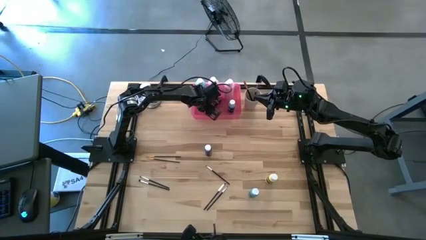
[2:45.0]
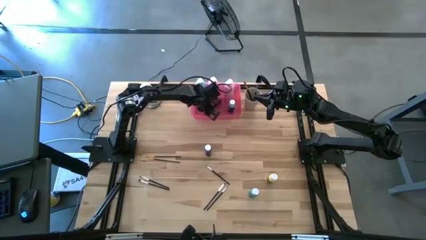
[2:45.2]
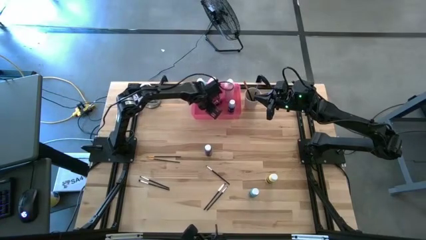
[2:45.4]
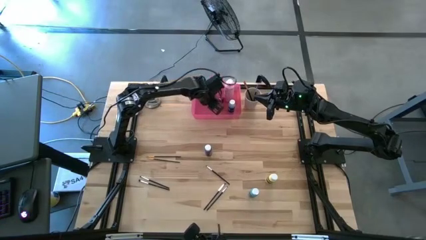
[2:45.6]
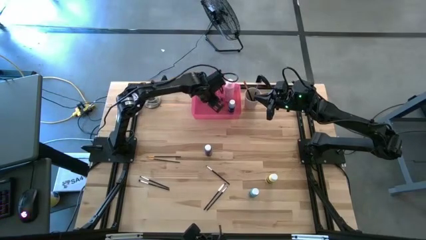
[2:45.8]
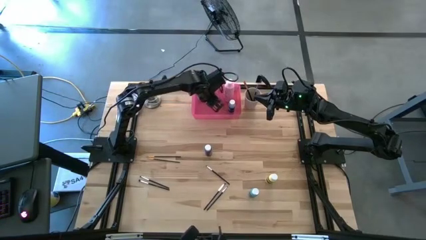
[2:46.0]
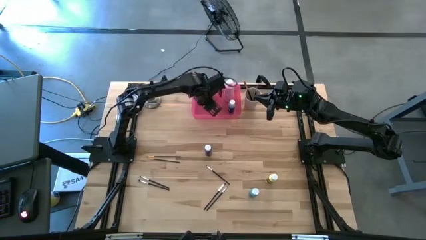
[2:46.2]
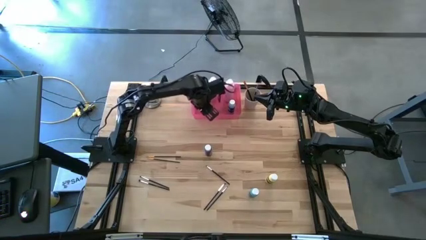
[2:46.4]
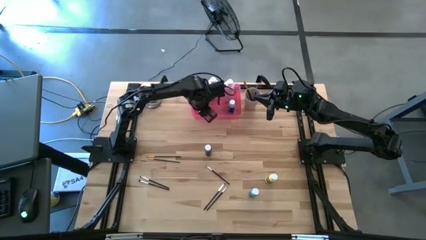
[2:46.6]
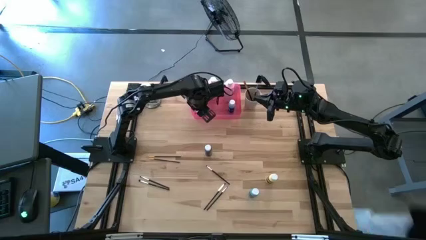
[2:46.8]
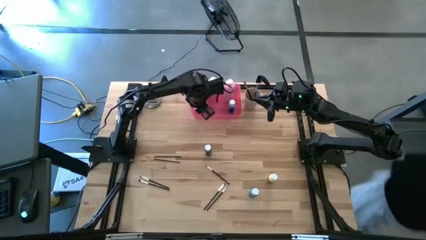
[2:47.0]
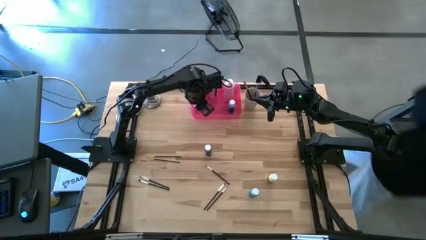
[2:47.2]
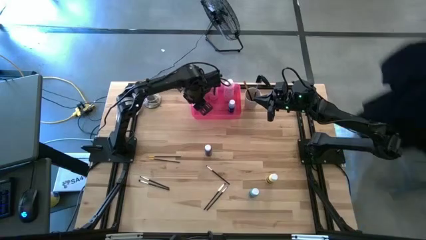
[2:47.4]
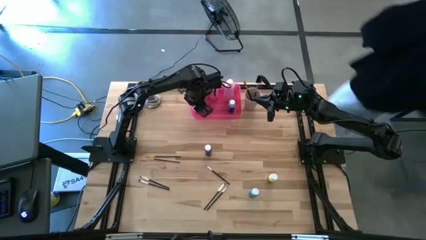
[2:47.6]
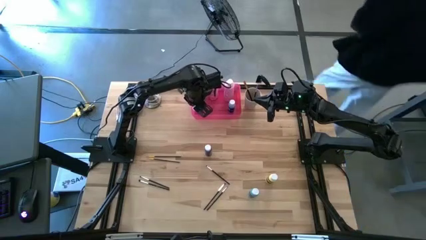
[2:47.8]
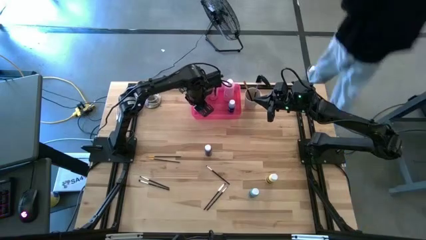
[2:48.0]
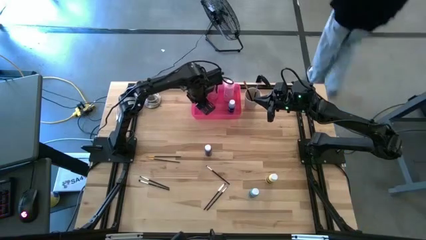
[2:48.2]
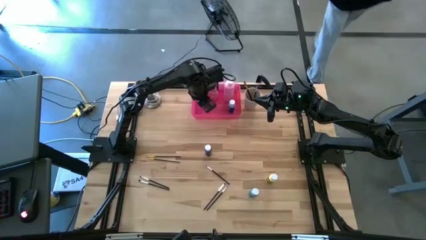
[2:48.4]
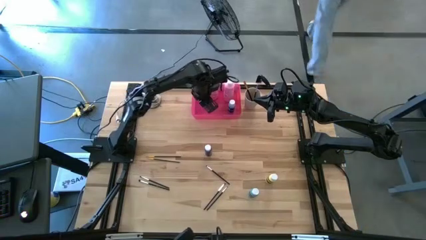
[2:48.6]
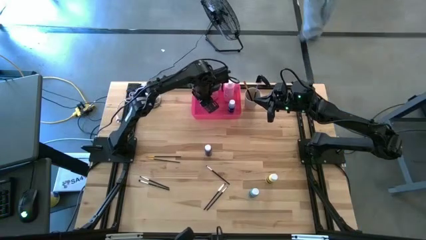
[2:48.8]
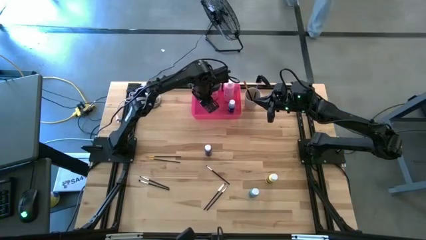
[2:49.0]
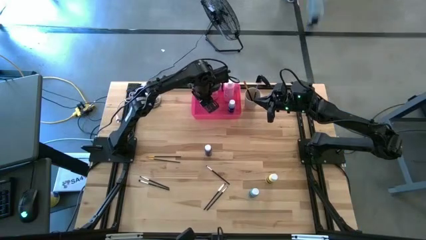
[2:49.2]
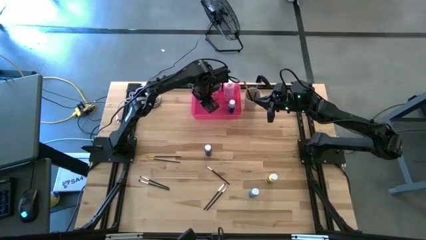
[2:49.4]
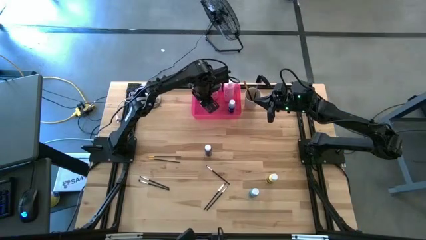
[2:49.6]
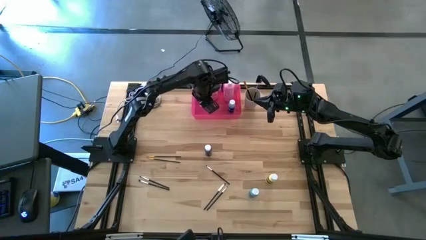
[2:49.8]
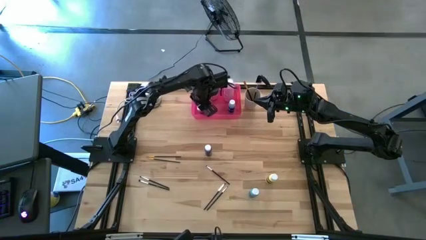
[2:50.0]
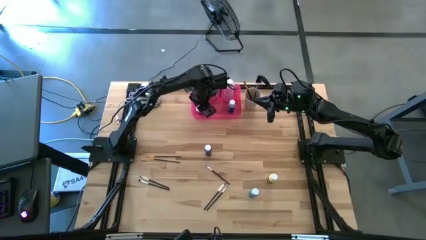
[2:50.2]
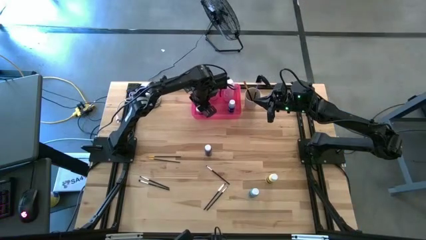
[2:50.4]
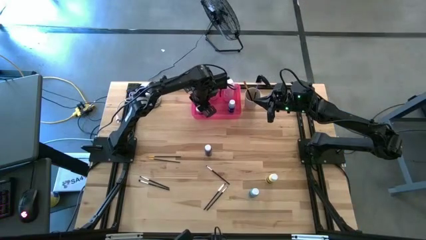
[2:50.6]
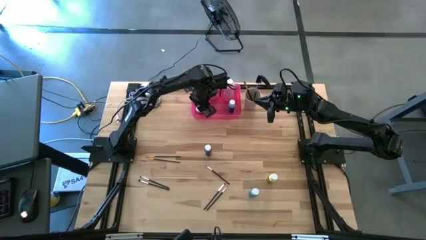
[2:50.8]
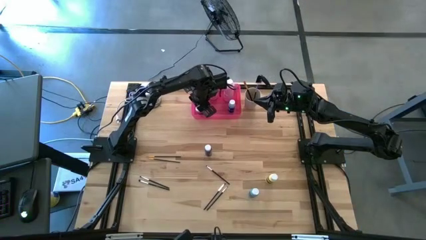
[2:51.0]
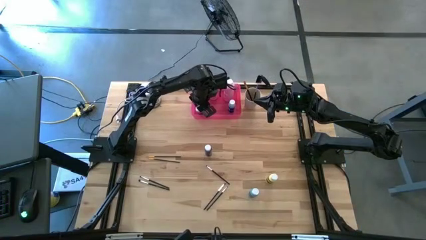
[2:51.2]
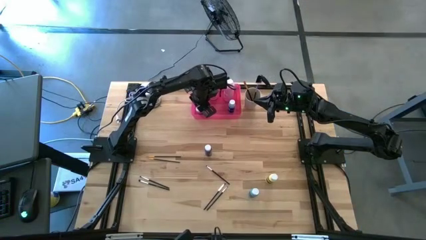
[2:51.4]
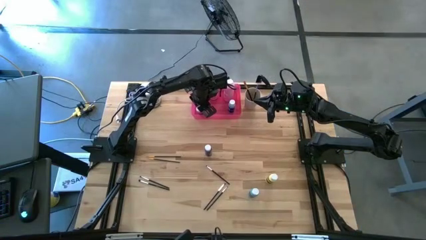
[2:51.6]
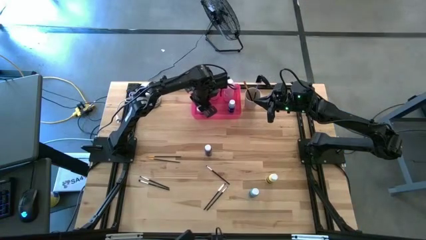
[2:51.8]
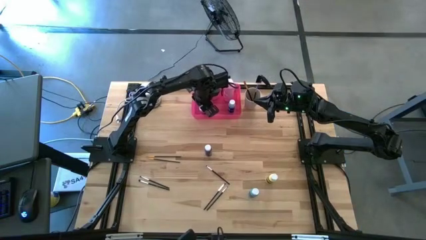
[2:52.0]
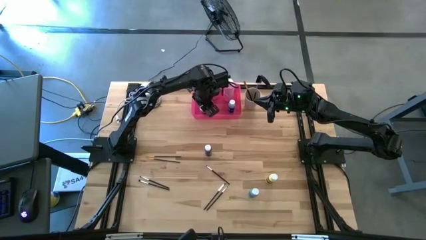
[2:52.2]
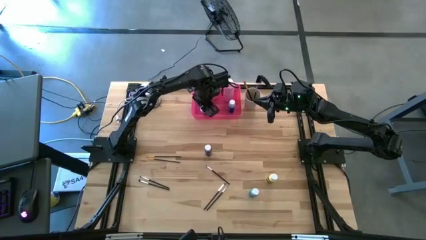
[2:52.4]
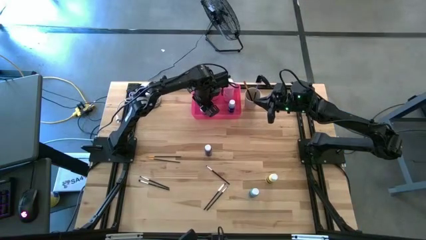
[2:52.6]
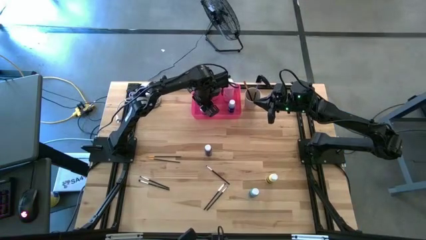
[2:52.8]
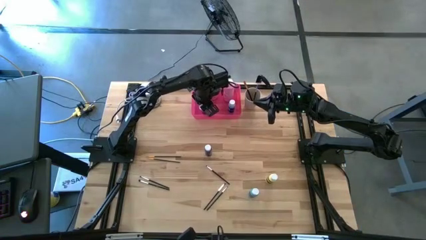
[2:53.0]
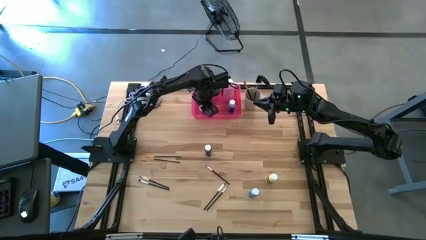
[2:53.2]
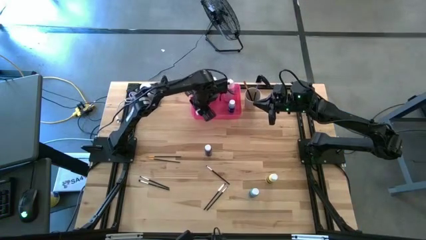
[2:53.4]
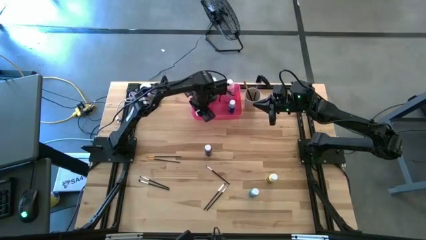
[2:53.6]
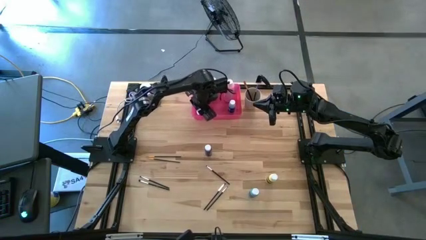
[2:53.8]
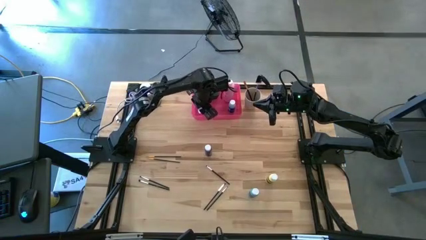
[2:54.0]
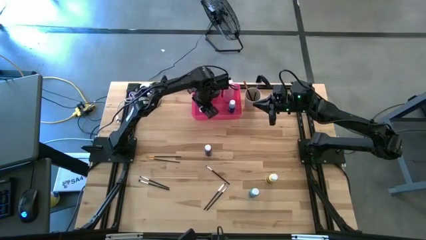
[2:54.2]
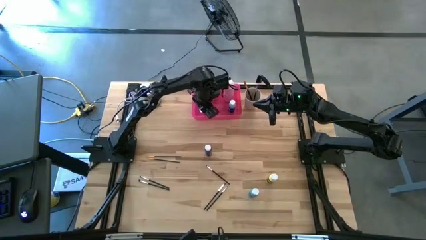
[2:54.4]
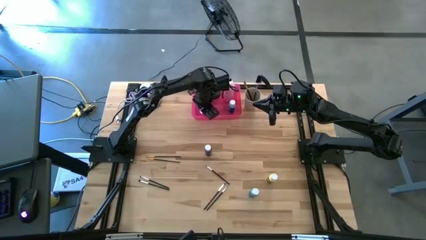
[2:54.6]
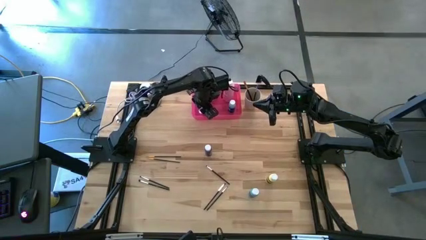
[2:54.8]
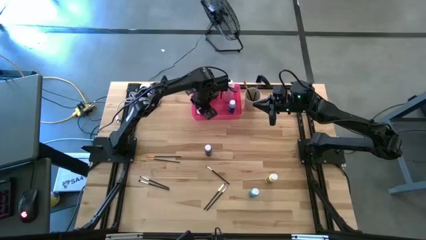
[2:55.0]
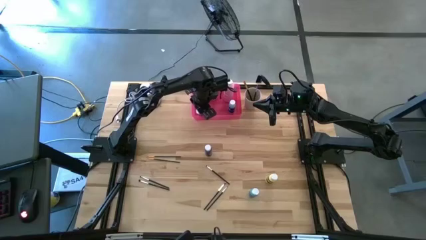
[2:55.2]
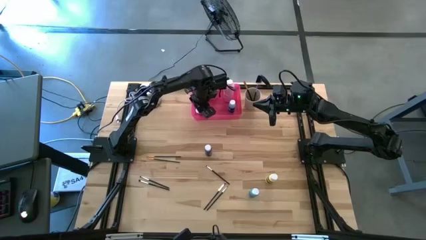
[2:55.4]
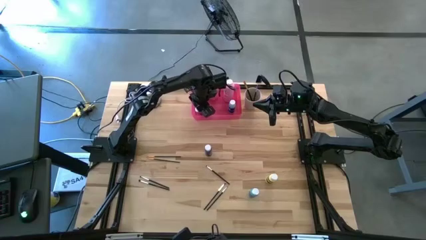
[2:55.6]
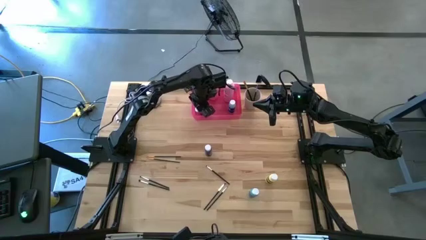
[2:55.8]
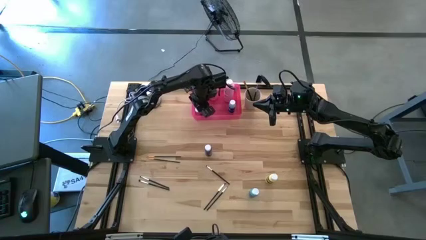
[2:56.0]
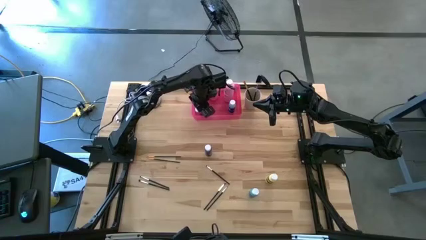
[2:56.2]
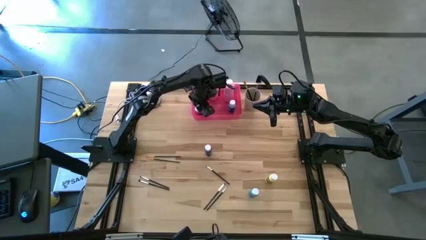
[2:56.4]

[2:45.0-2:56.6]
Task: Pick & Place Paint Supplies
Put the small pink paint bottle into the pink bin
